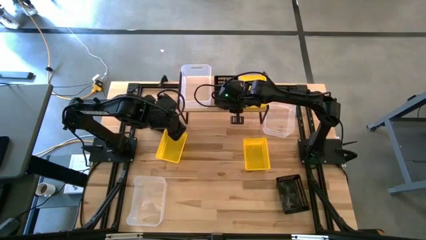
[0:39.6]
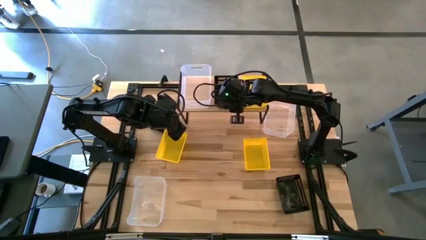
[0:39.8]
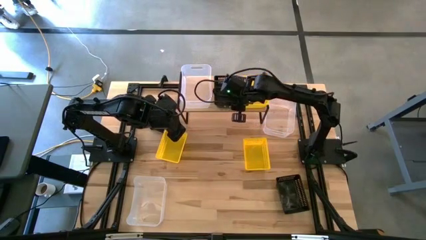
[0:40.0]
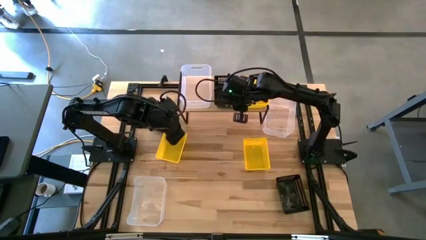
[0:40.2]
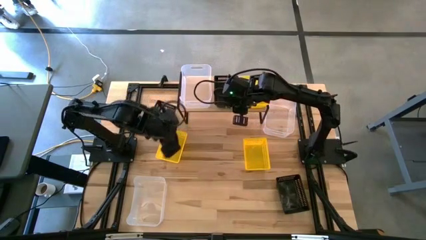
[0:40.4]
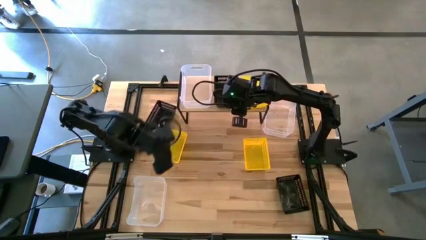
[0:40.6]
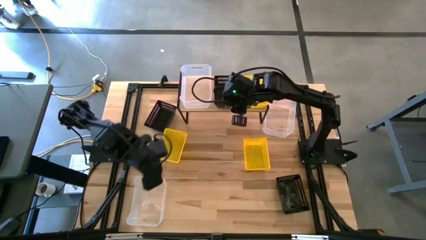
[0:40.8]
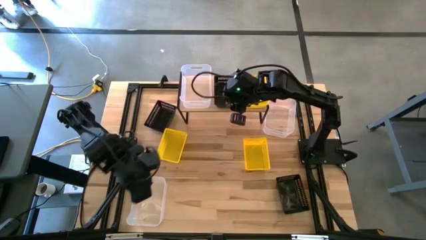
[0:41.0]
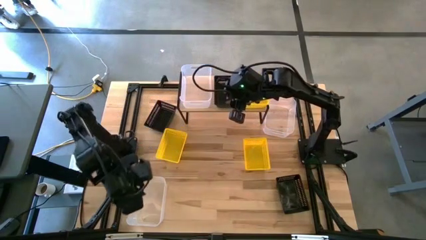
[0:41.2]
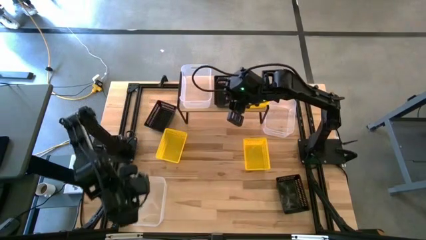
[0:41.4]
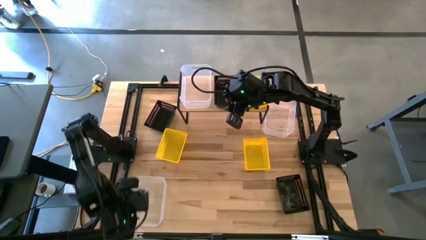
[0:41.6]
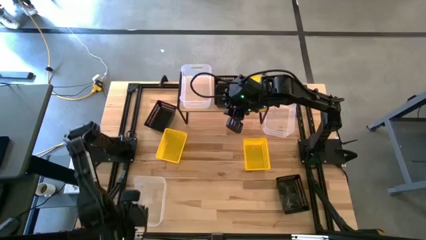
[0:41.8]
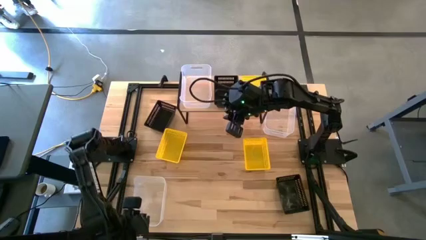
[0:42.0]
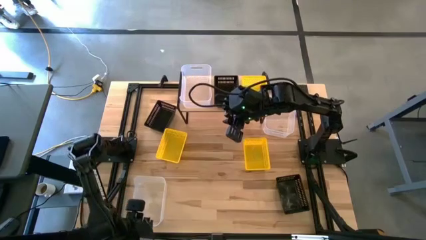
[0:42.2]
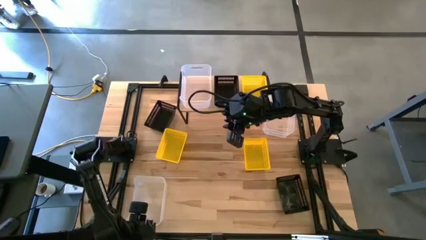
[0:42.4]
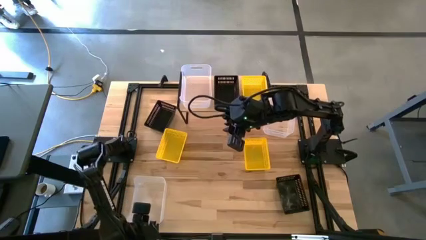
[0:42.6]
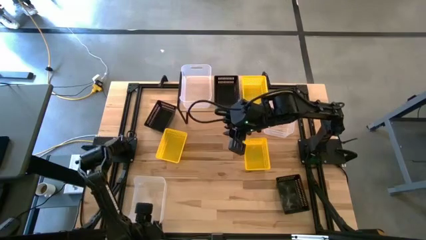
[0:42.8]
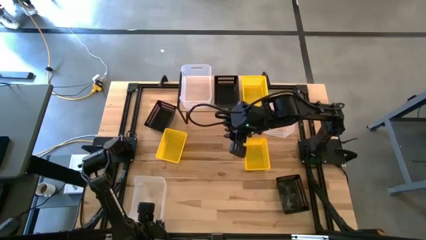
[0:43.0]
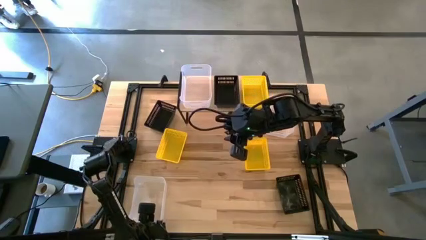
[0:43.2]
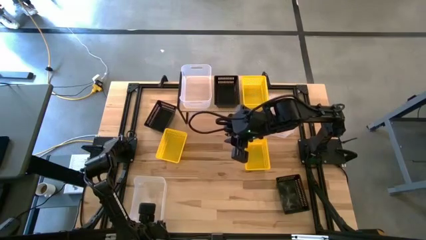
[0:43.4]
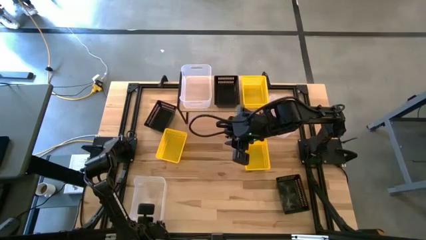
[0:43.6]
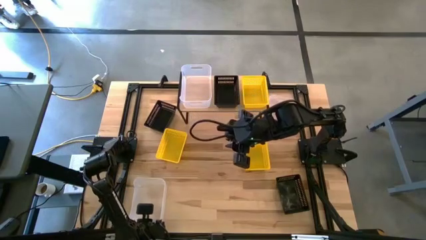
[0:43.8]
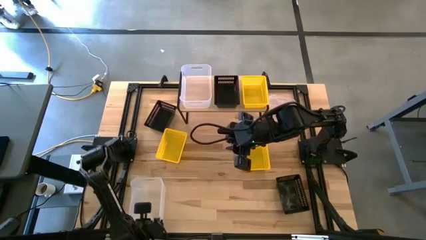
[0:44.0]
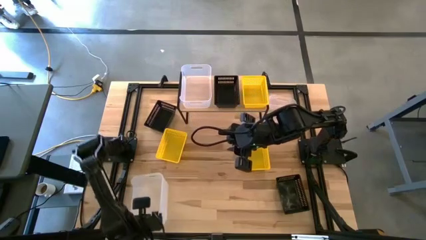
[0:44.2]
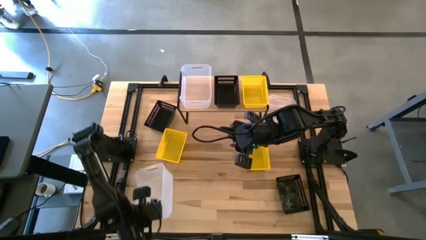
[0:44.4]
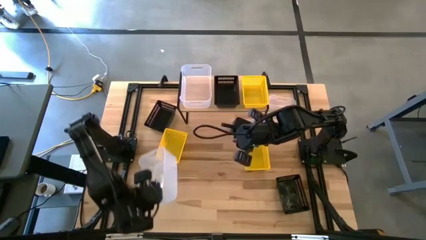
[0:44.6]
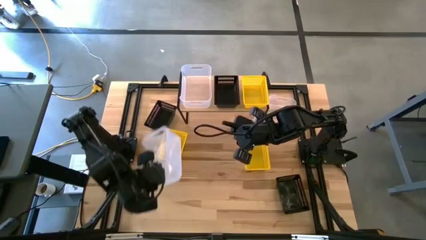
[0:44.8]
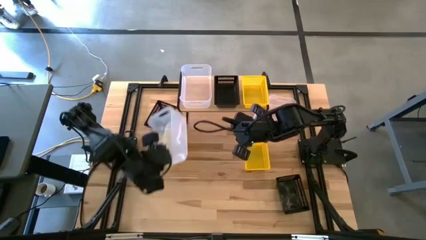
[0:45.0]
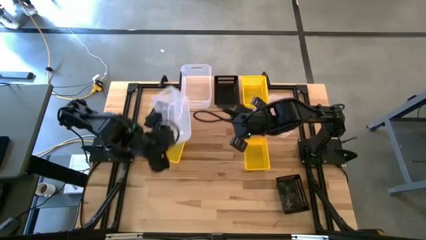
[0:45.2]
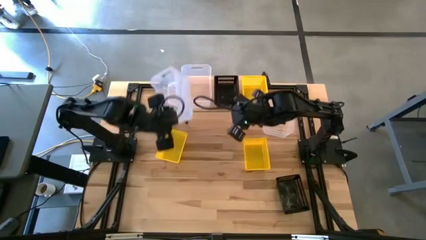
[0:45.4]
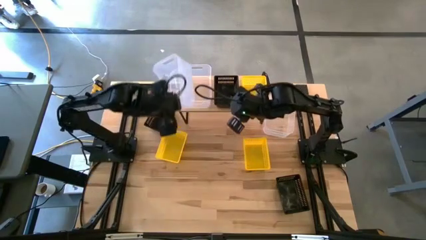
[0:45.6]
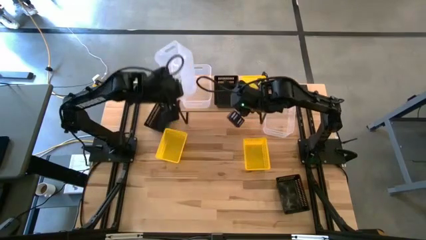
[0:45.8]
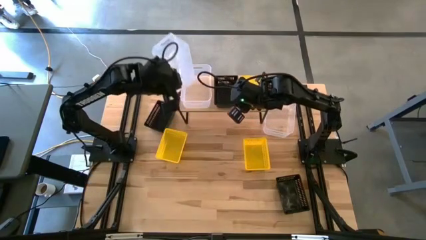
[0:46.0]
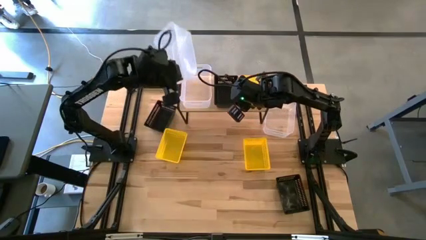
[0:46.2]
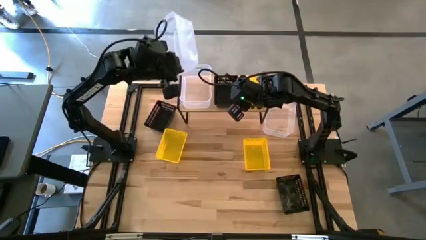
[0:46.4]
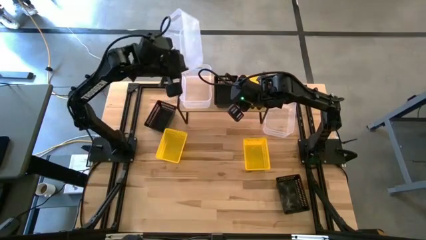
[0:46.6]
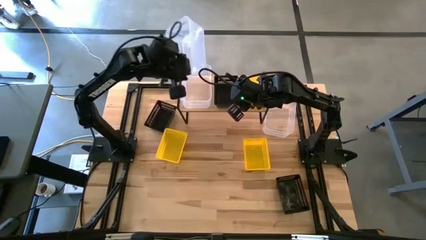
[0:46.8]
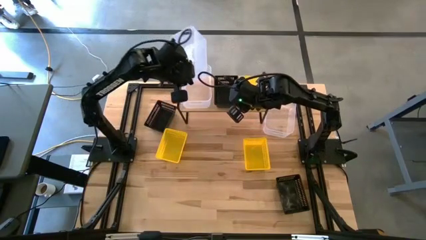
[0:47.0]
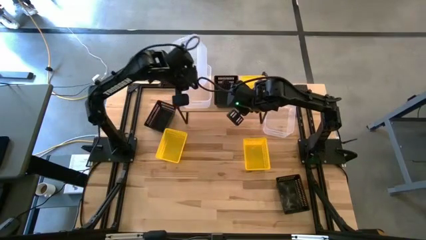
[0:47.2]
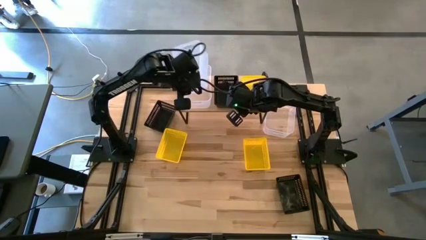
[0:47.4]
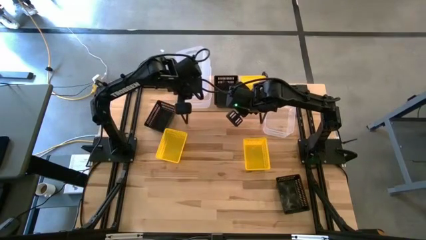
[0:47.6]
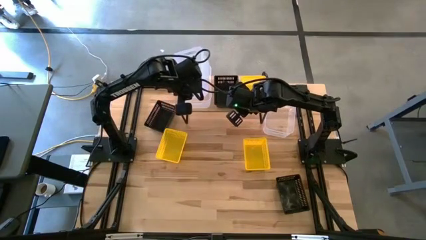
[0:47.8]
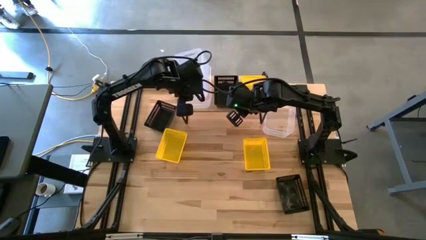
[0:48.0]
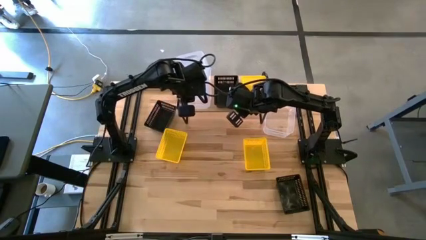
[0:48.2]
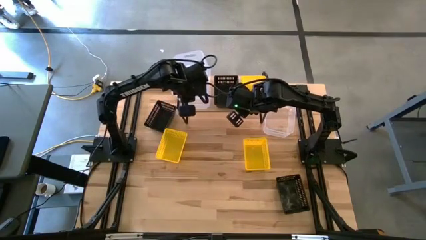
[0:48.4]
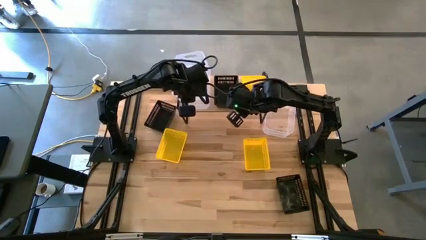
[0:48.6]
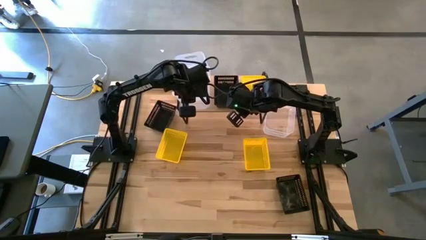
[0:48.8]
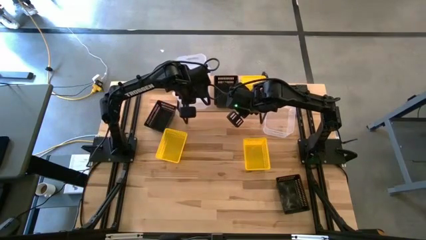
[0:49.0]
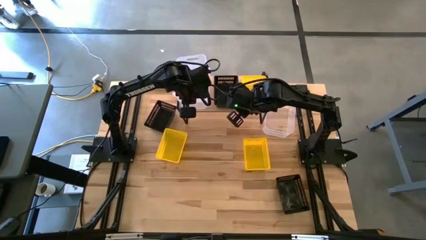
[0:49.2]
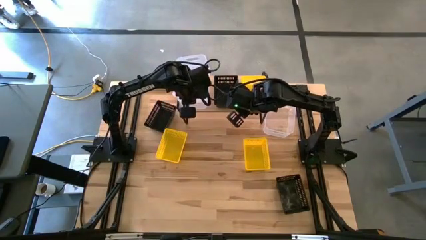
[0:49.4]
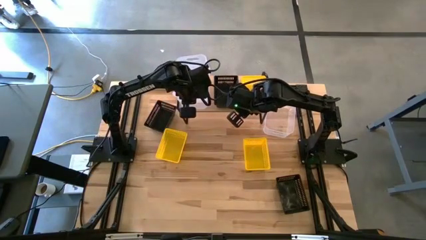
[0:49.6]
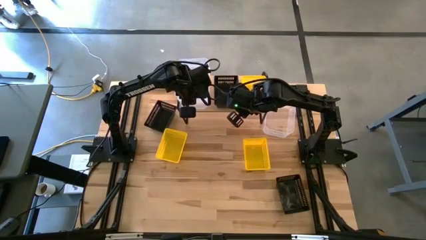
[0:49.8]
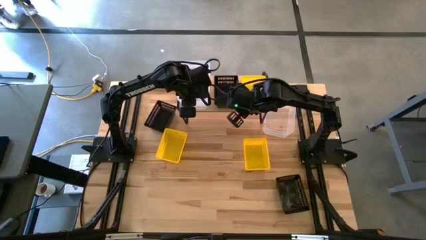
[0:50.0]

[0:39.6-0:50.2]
Task: Stack baskets on shelf by color
Stack the bottom transparent bin on top of the transparent bin

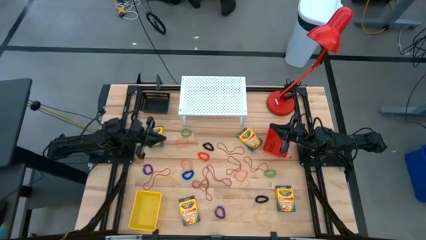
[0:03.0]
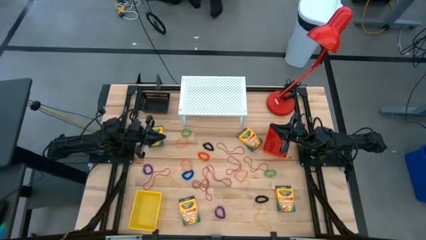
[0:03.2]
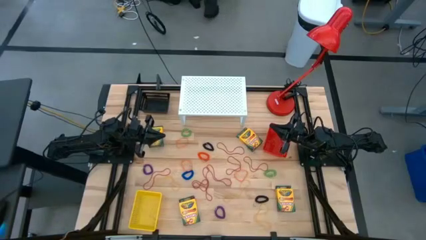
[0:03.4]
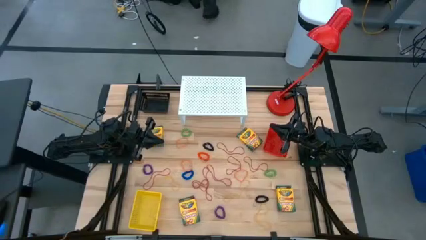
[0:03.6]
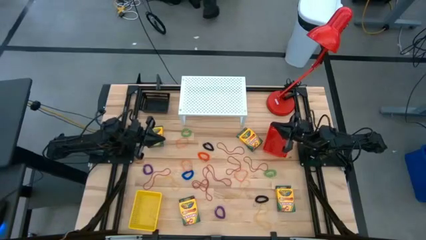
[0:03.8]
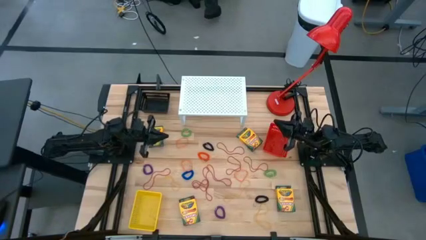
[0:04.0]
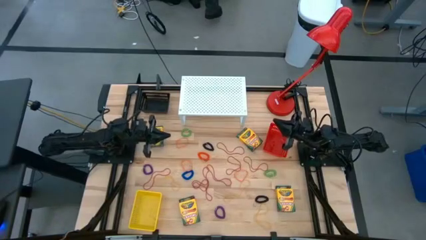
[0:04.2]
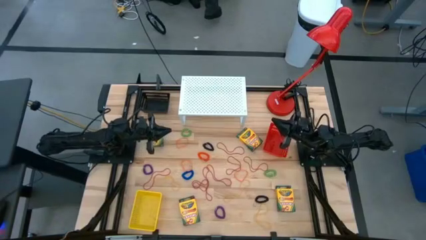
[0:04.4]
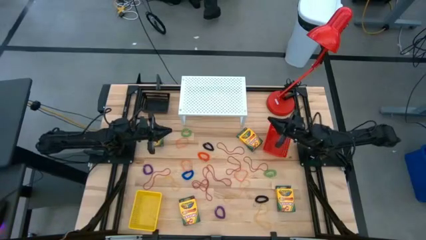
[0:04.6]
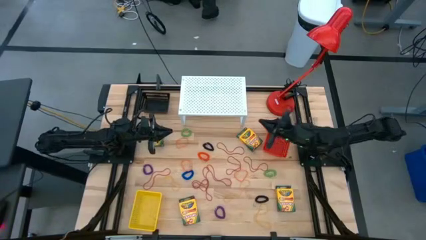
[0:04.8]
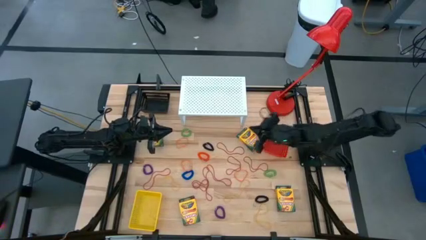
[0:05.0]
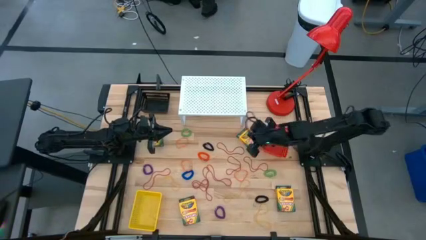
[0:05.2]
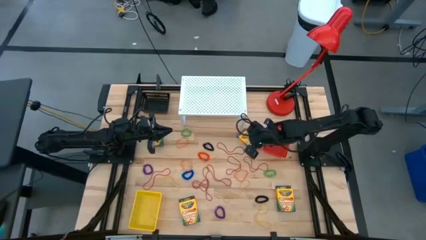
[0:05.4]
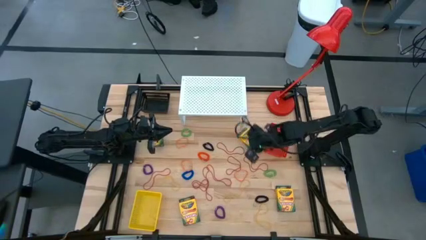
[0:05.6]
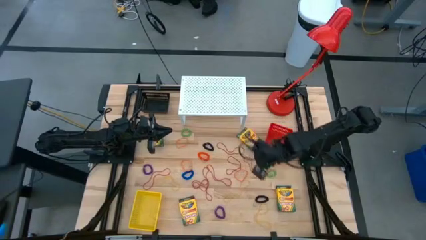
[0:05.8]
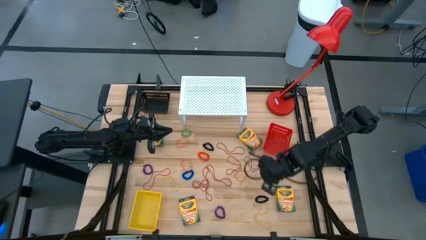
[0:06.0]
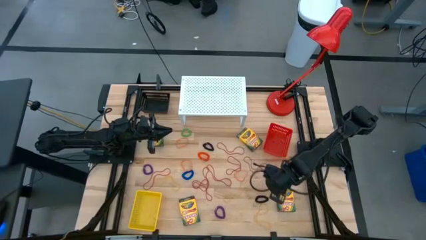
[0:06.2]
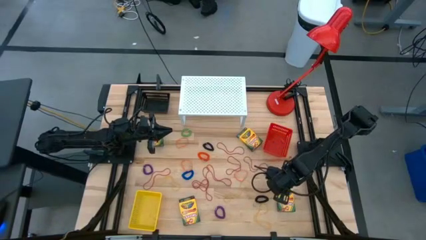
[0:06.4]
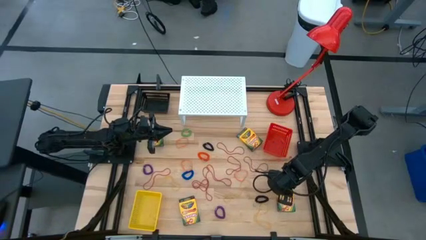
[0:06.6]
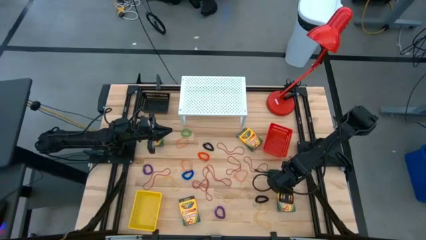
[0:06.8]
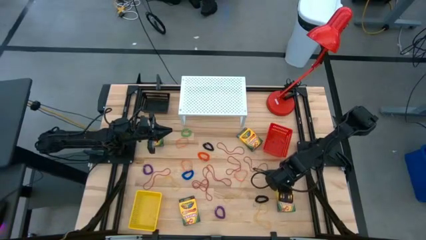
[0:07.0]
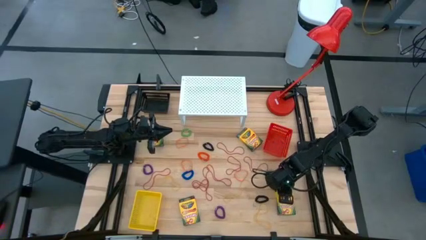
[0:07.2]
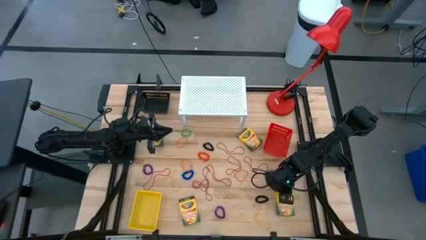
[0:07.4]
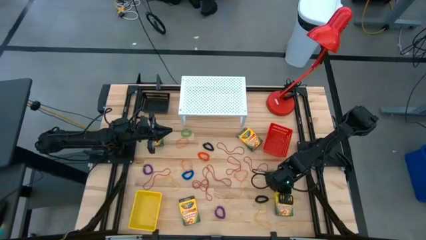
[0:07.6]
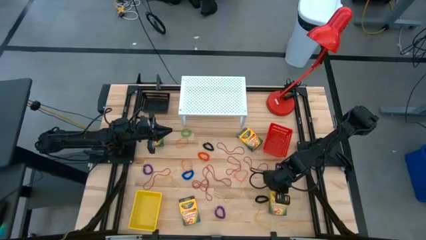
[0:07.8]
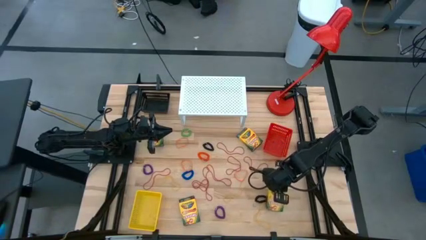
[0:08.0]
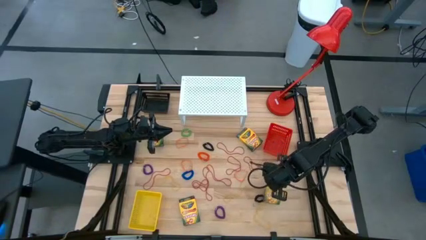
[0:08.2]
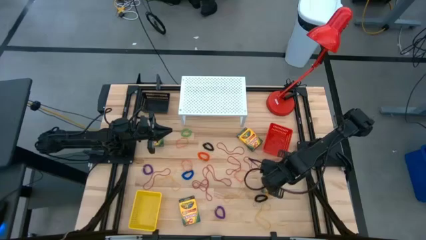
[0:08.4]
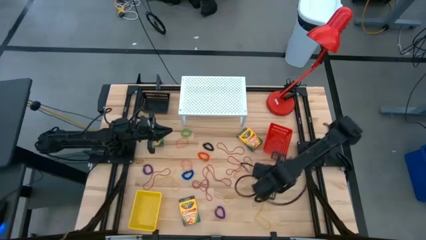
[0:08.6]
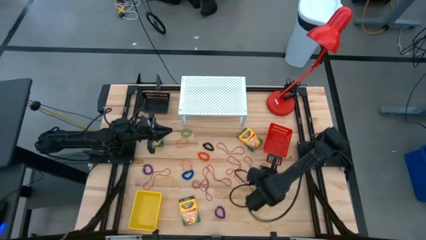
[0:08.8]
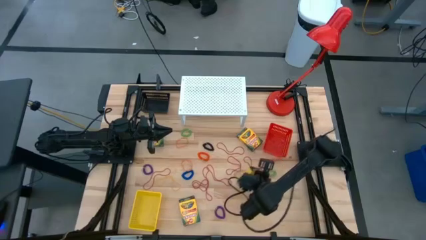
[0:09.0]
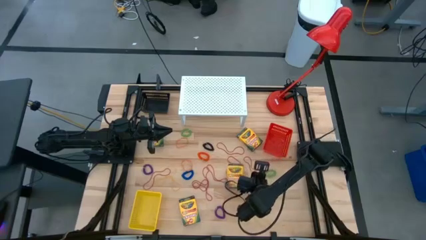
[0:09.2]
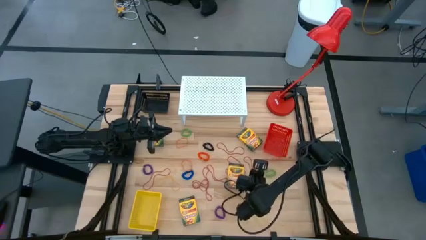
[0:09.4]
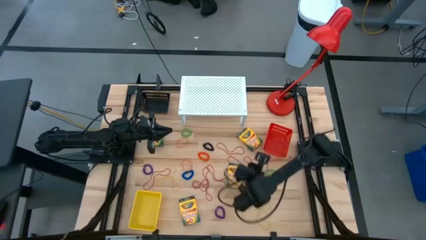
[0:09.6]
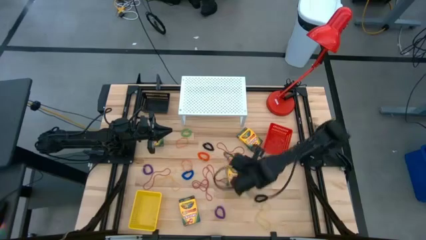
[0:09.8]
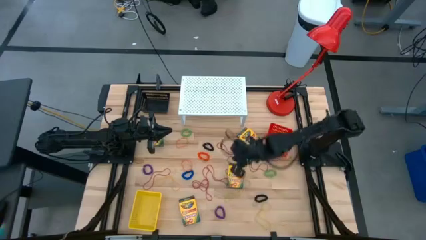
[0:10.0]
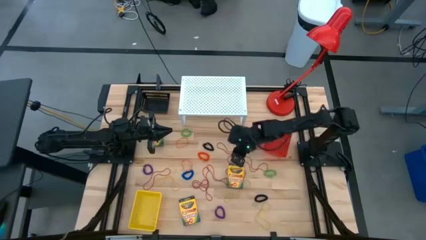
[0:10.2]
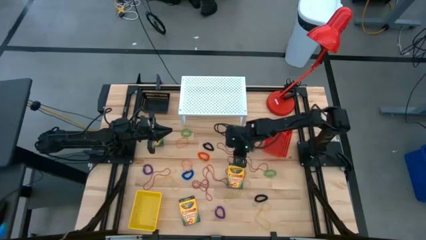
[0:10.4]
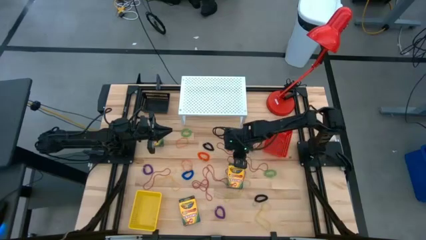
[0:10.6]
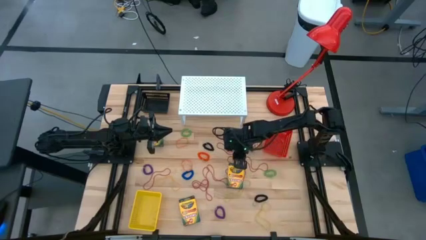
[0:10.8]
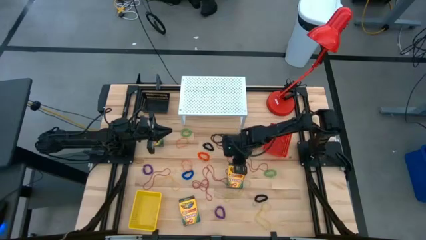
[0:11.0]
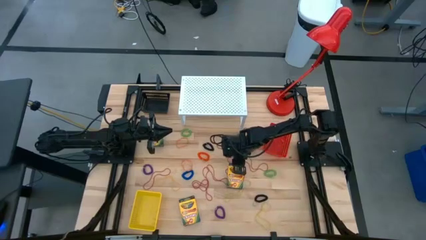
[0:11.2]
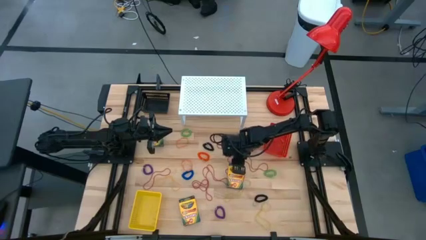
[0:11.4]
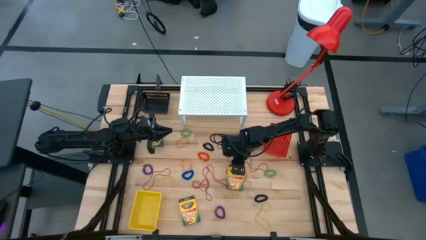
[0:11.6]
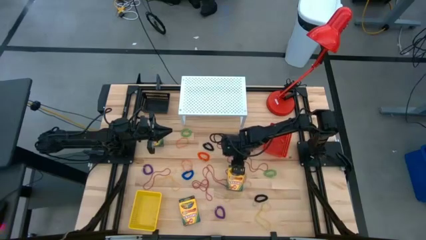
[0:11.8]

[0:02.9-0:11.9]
Task: Pick & Place Office Desk Supplies
Put the box yellow crayon into the red bin
